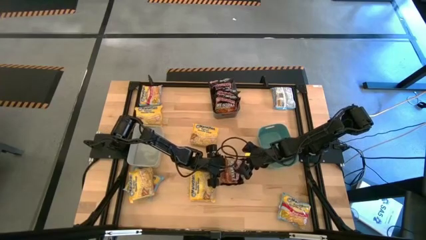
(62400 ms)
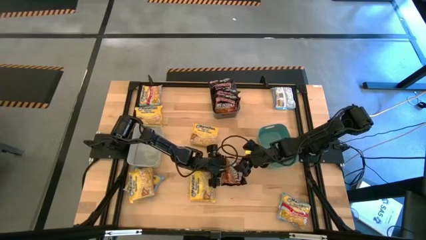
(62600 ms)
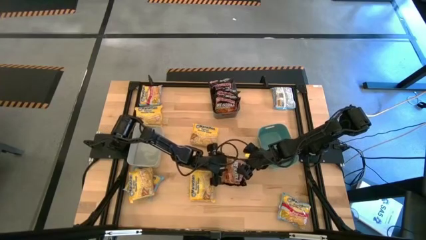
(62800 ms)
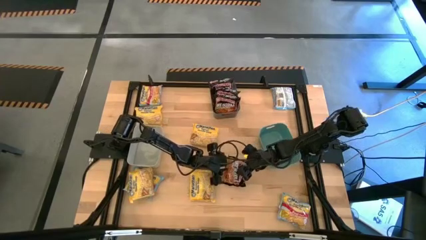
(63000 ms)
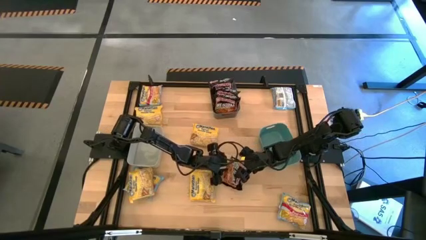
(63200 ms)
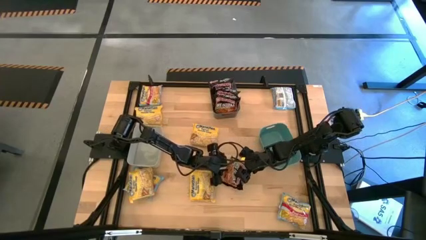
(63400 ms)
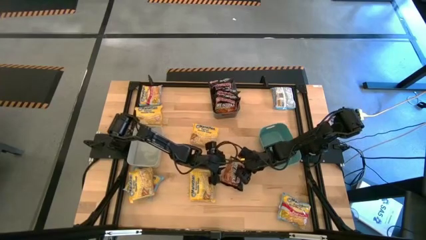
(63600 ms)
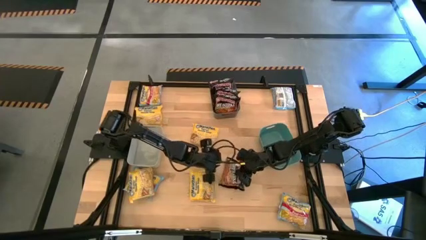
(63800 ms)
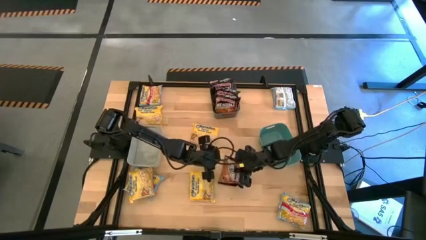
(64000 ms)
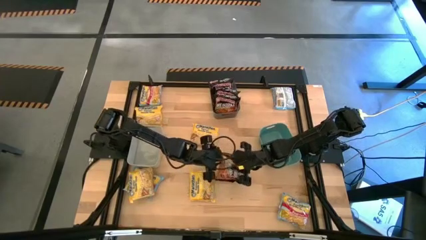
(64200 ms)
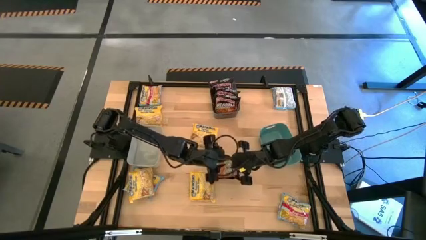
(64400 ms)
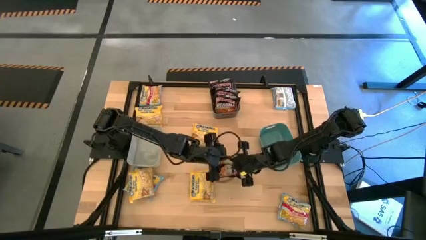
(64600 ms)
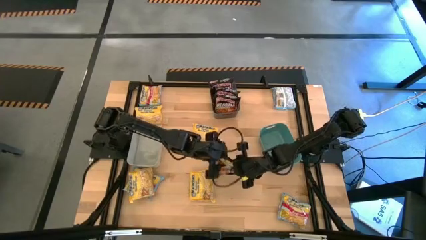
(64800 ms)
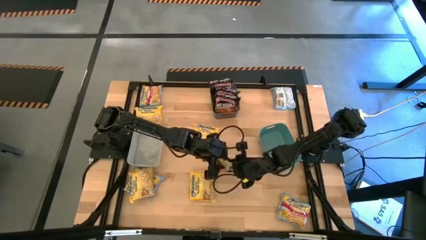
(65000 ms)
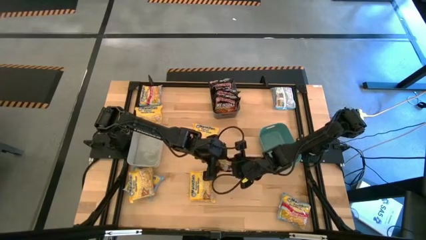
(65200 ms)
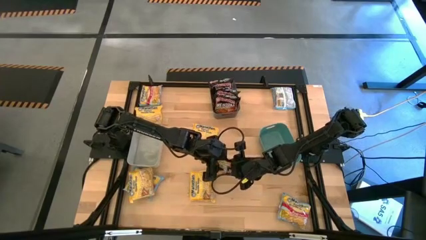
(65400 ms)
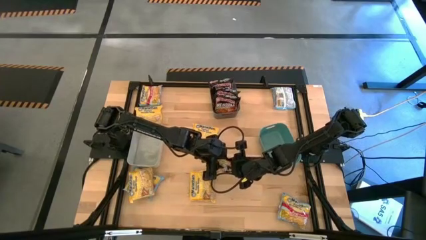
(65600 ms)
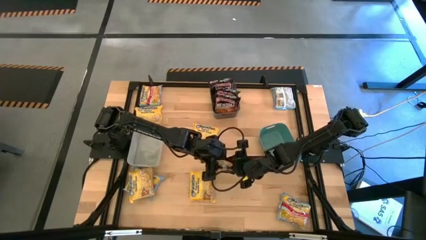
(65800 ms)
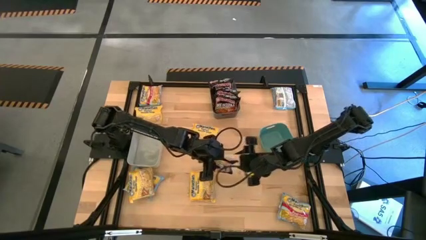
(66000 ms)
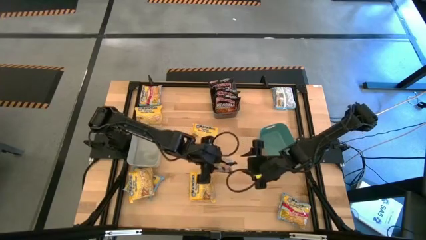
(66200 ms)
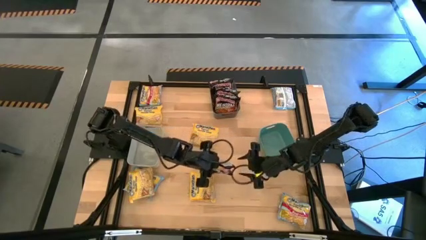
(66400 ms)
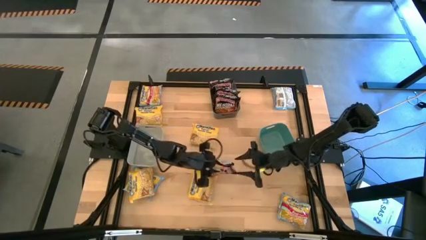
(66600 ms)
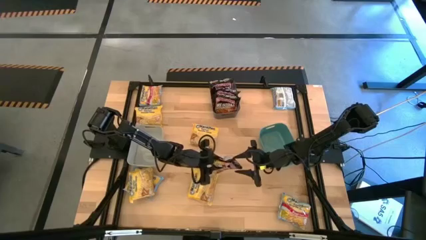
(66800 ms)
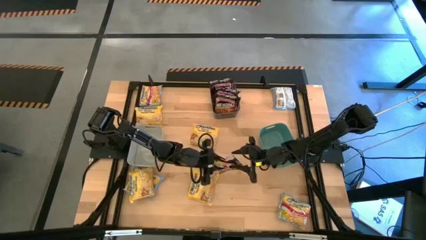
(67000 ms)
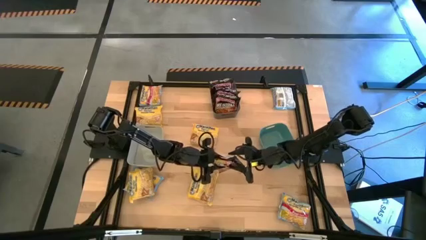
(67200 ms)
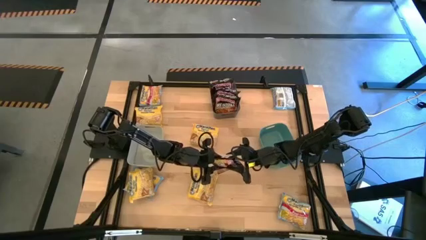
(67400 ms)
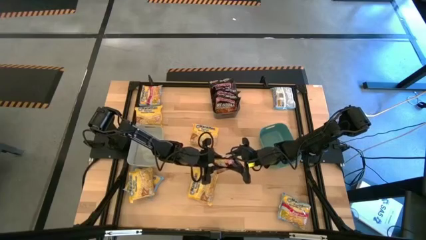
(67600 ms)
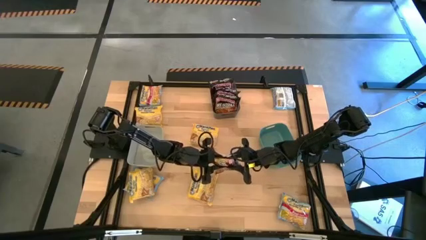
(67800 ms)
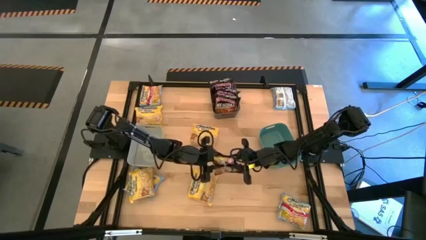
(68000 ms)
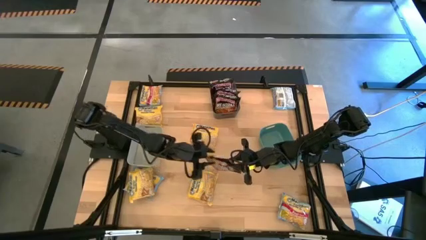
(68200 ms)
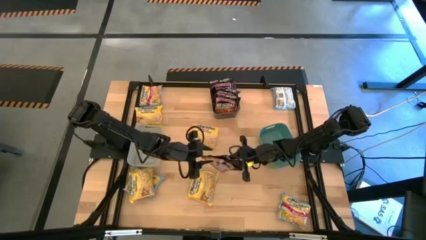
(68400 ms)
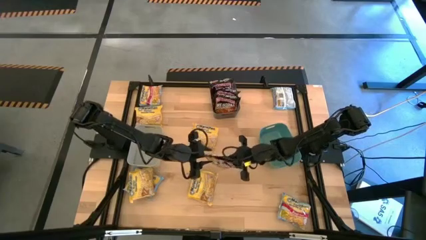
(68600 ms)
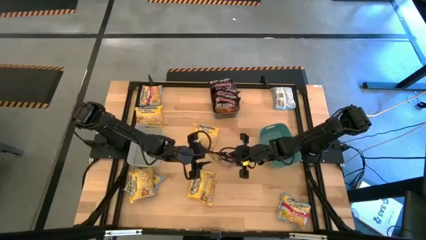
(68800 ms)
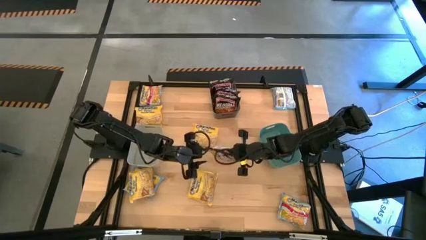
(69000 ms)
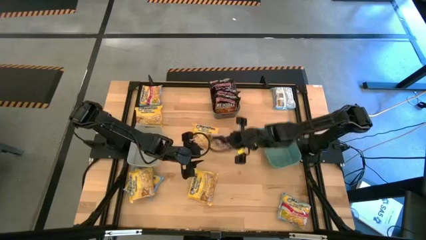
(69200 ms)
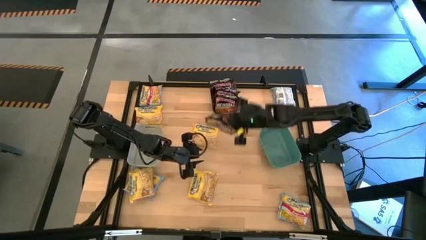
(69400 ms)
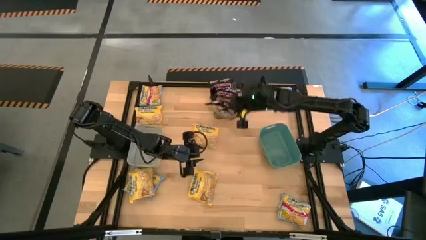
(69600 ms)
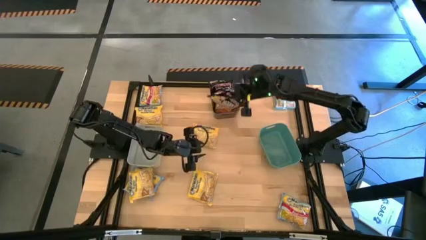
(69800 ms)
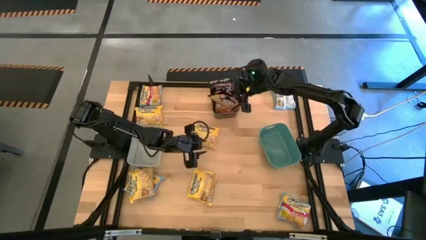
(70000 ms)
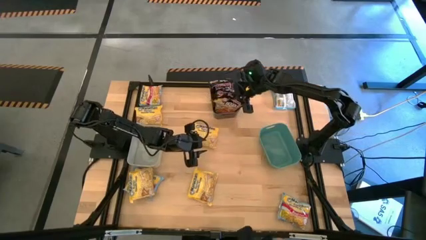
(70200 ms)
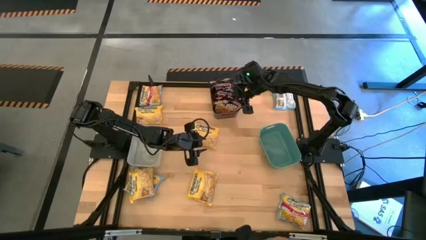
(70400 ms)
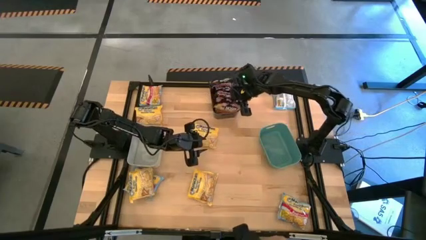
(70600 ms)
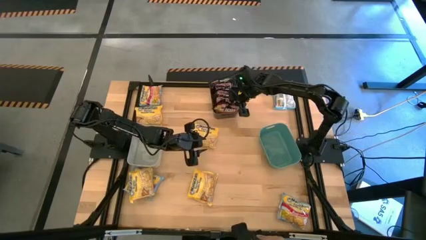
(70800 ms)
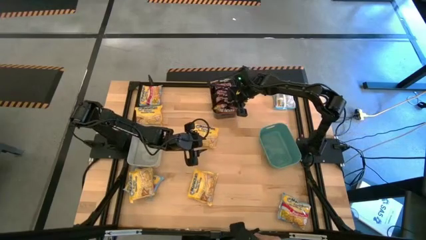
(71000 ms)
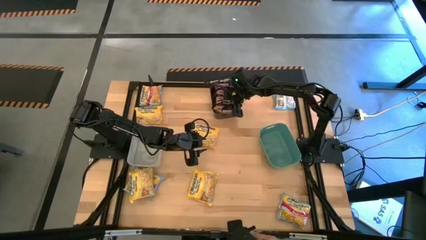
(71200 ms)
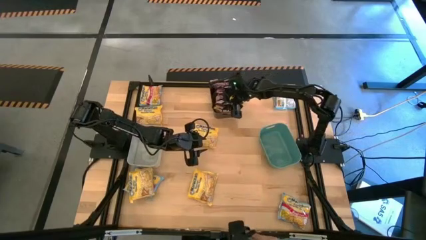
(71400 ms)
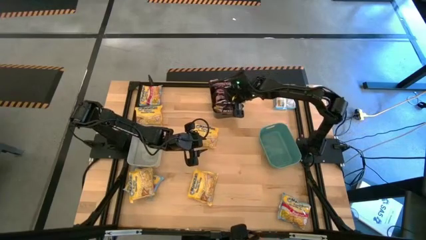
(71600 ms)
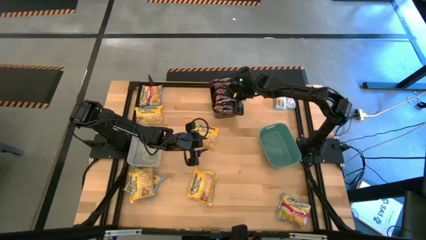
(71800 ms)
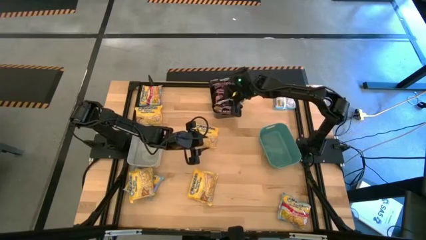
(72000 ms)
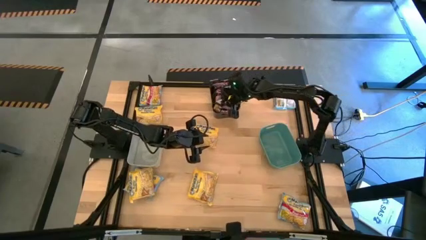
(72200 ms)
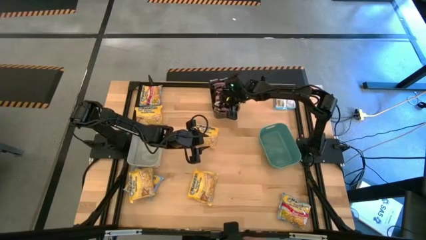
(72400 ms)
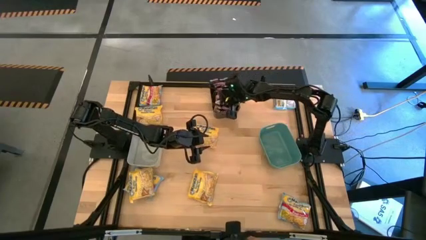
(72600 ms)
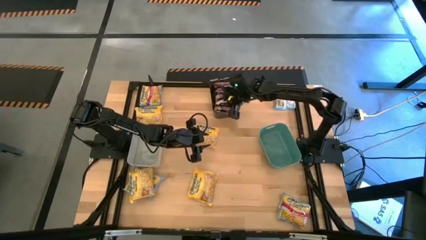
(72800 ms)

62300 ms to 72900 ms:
Task: Sort Maruchan noodles
Put the black noodle pack into the black bin

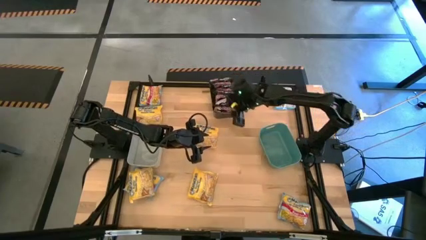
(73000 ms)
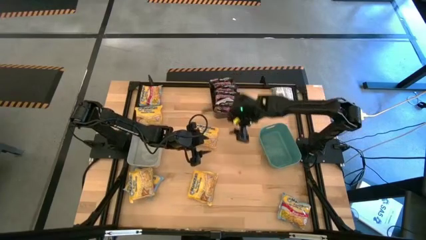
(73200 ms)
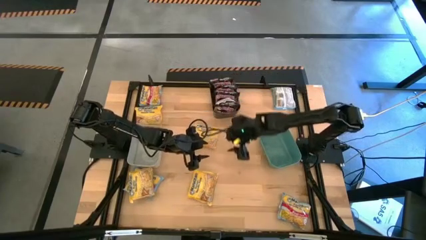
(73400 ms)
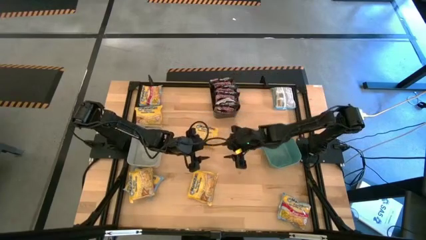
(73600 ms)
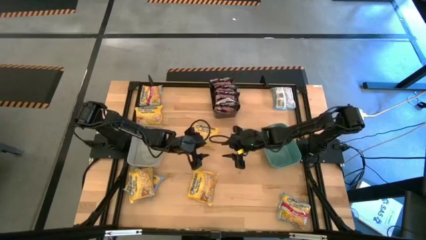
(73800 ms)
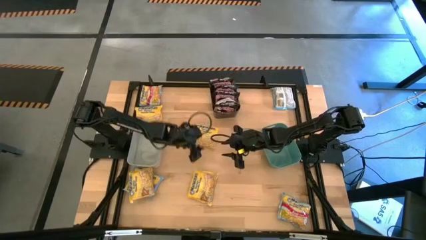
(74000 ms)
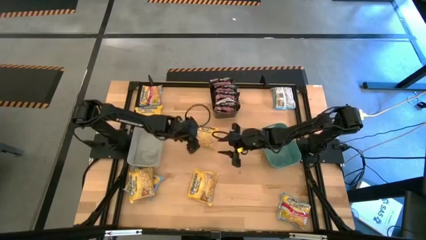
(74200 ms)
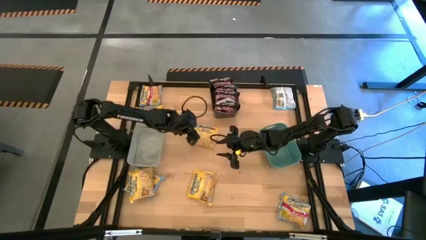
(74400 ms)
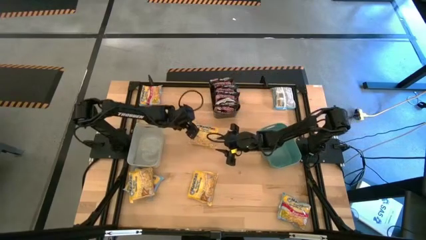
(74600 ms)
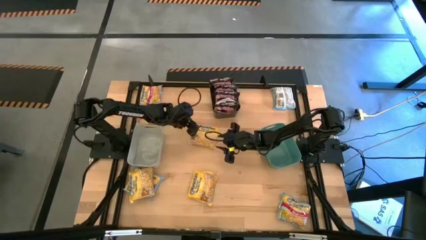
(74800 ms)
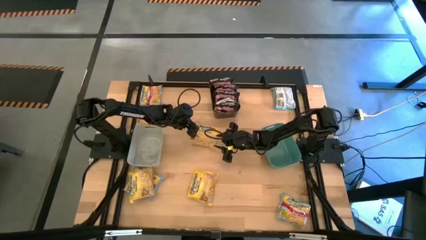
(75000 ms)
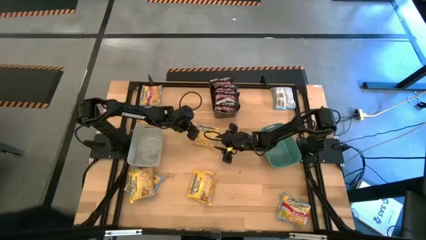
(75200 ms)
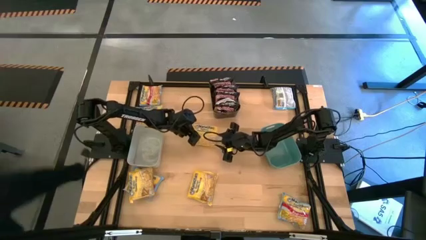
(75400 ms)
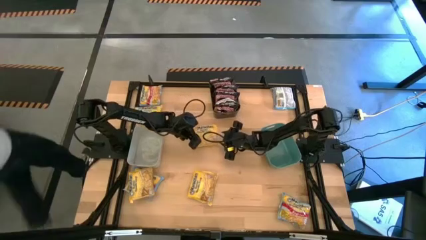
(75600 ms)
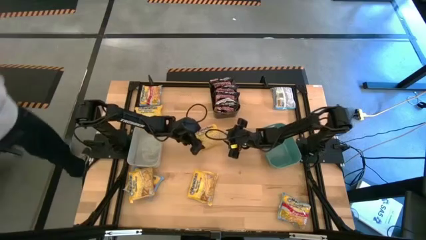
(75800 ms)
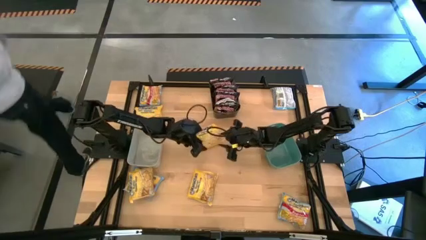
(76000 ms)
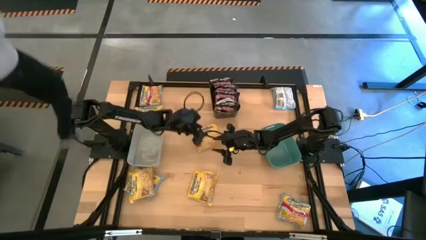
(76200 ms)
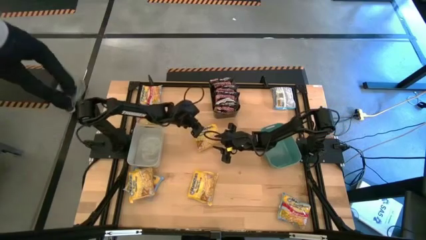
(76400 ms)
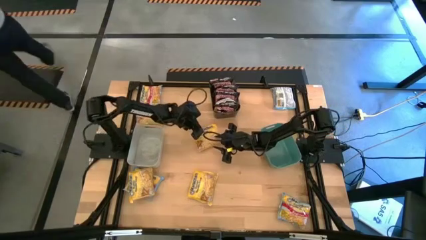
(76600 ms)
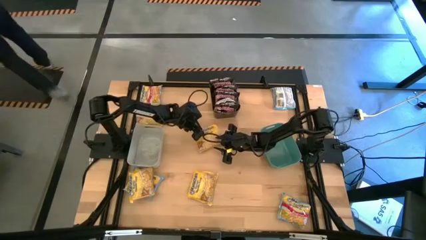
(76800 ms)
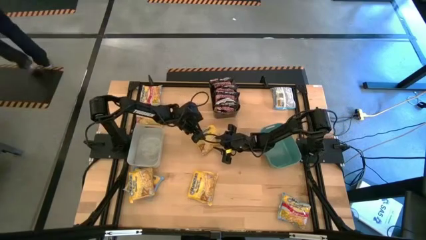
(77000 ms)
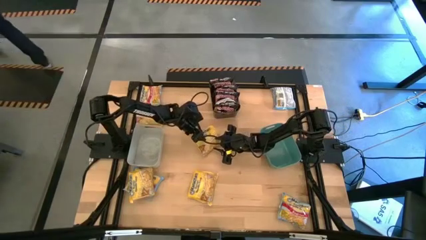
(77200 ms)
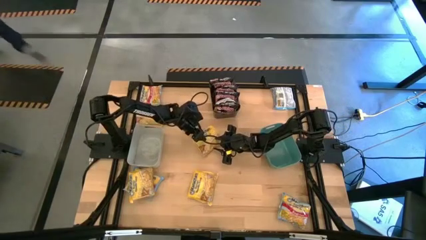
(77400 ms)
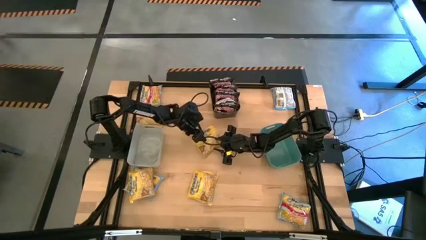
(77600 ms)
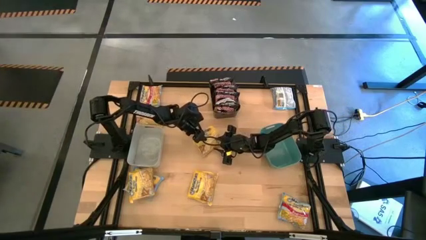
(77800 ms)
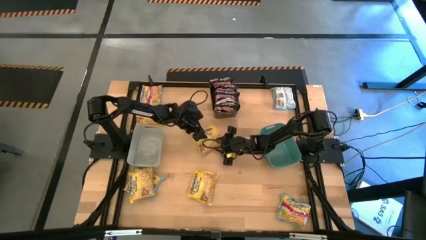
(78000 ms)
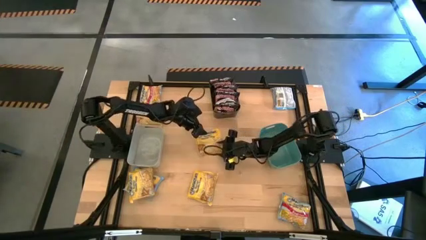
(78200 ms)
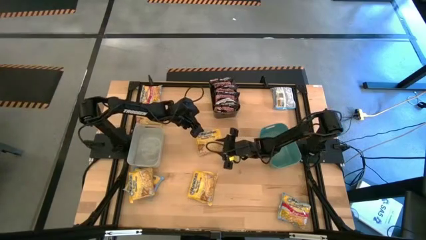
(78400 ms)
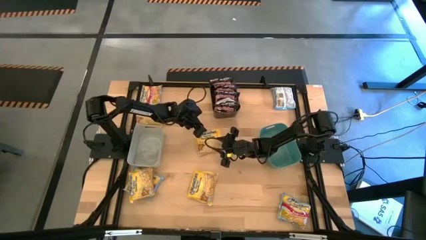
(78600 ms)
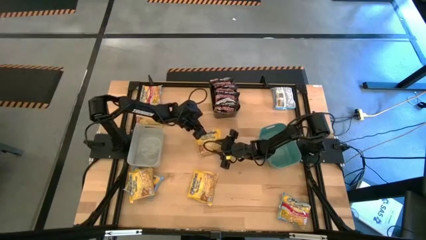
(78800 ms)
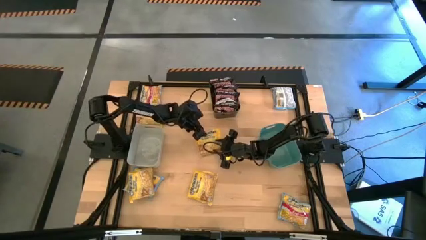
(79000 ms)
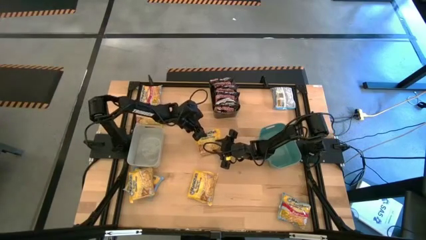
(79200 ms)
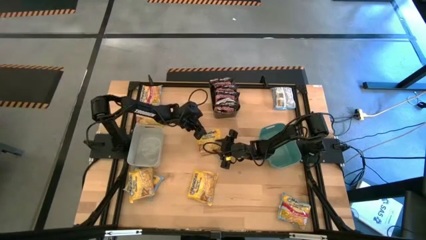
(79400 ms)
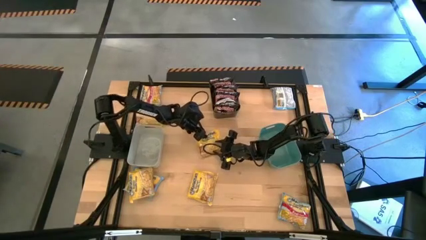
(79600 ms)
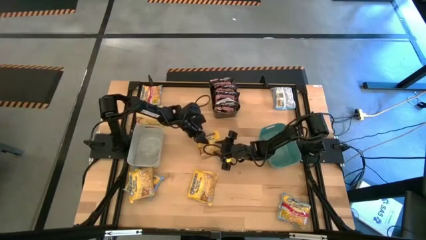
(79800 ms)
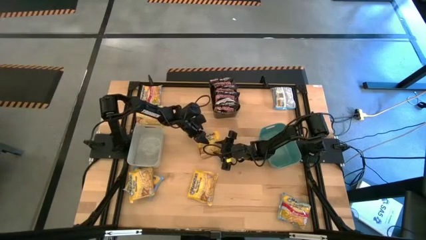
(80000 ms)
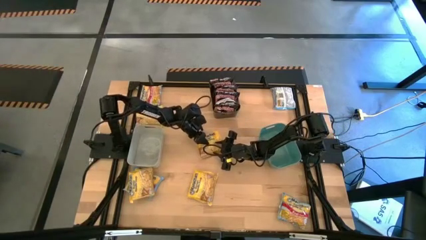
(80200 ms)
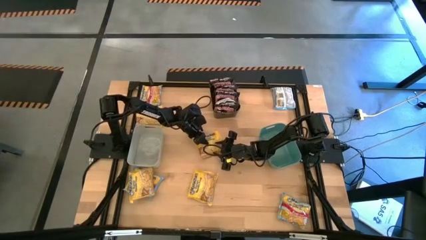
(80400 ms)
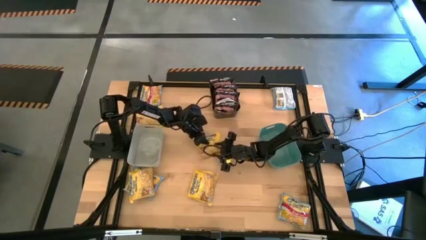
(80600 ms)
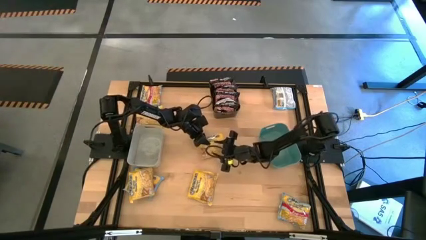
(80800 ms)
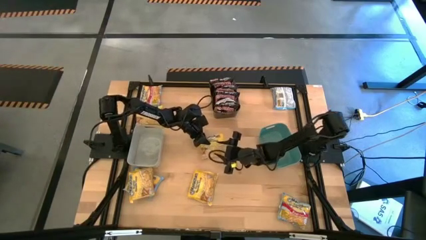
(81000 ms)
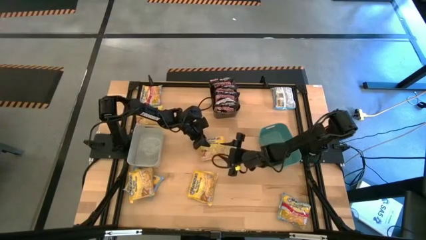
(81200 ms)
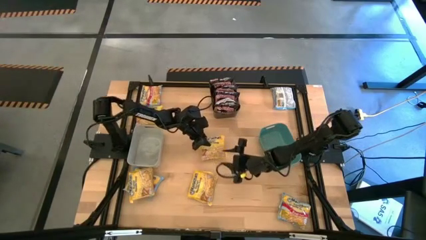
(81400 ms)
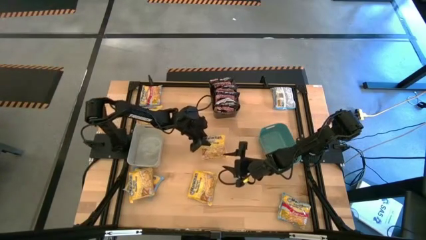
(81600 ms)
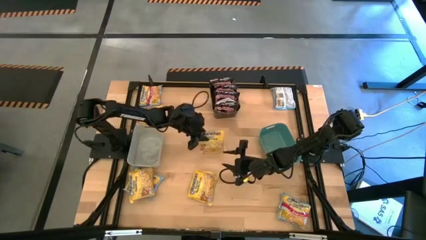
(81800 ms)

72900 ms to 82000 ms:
Put the yellow noodle pack into the blue bin
